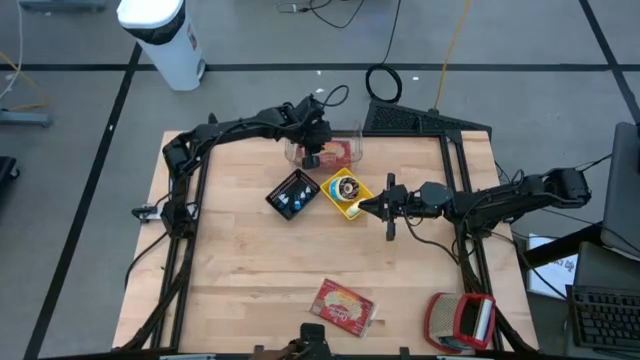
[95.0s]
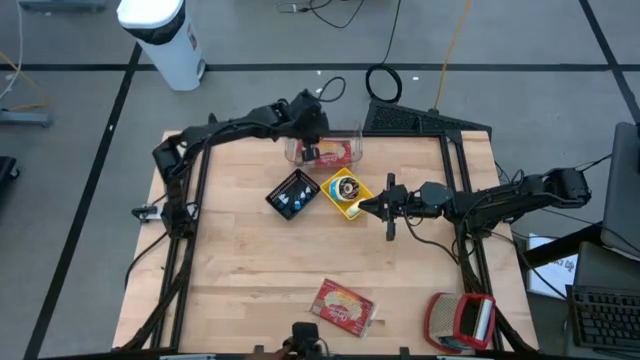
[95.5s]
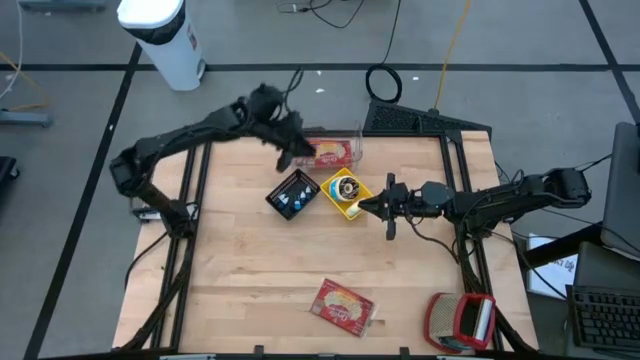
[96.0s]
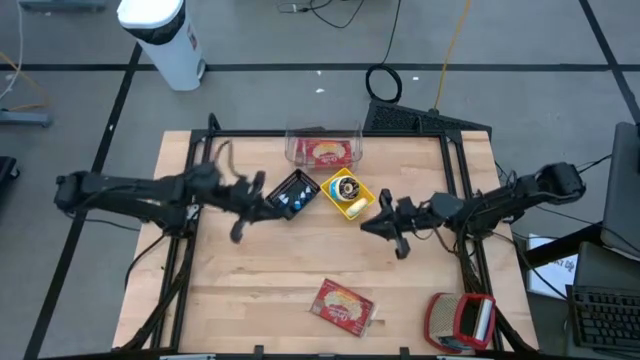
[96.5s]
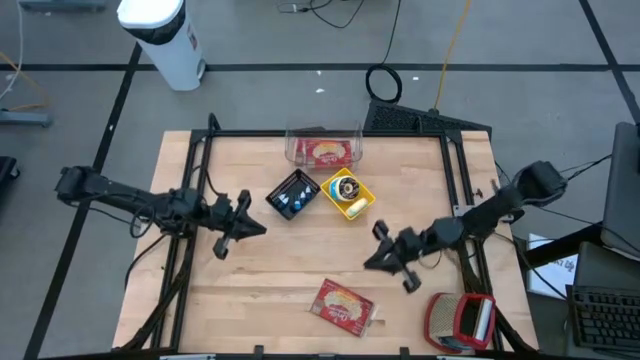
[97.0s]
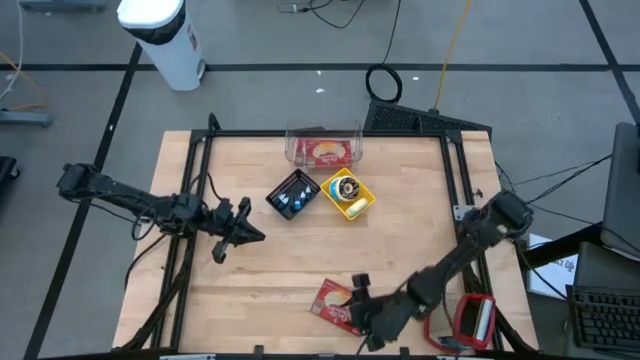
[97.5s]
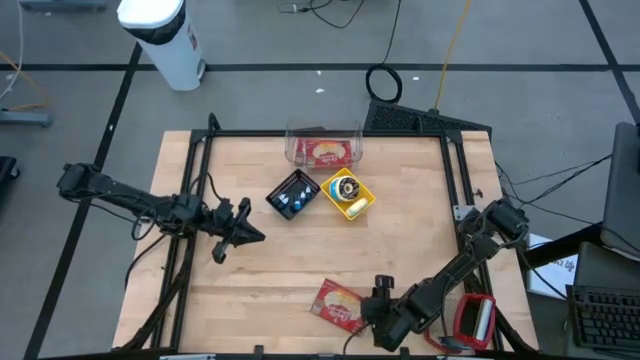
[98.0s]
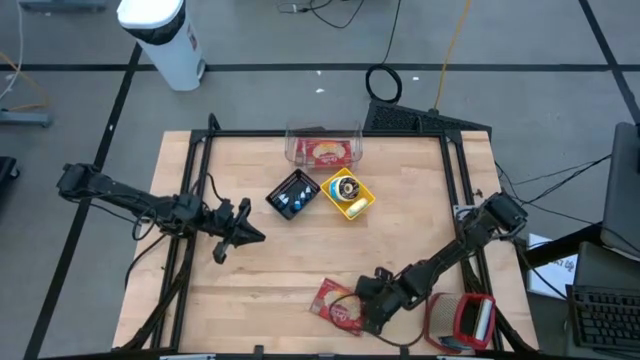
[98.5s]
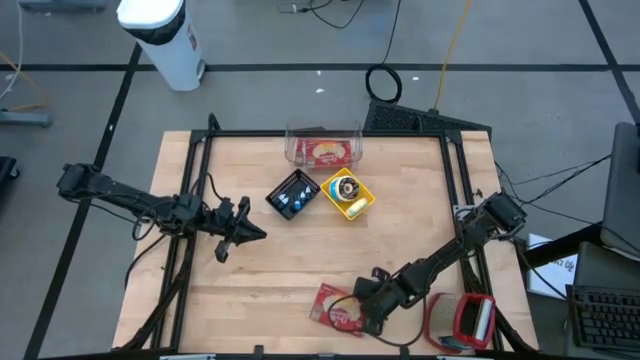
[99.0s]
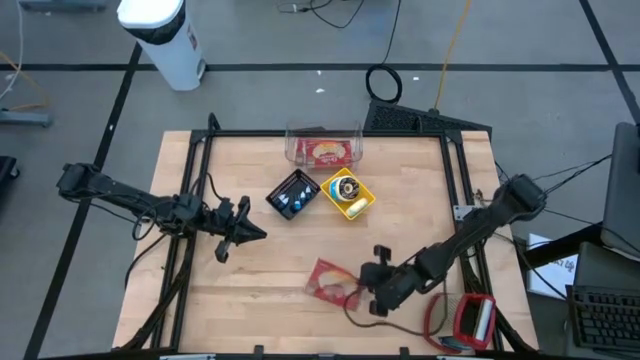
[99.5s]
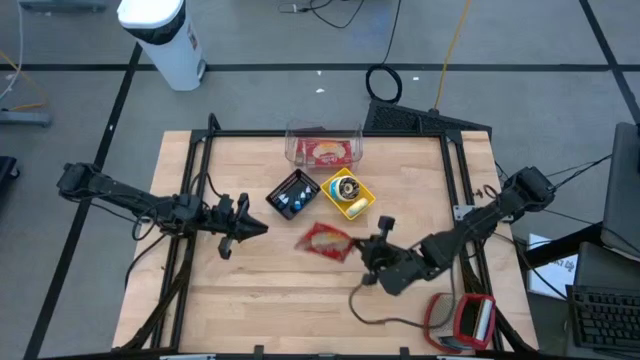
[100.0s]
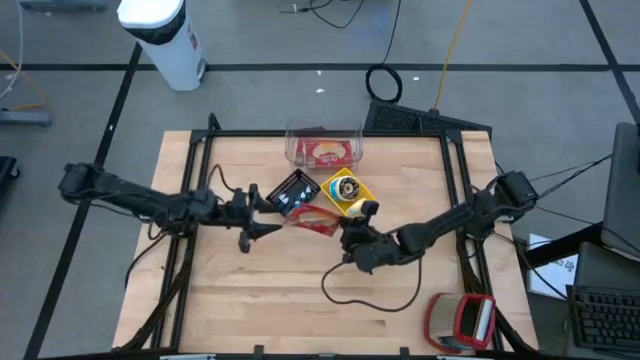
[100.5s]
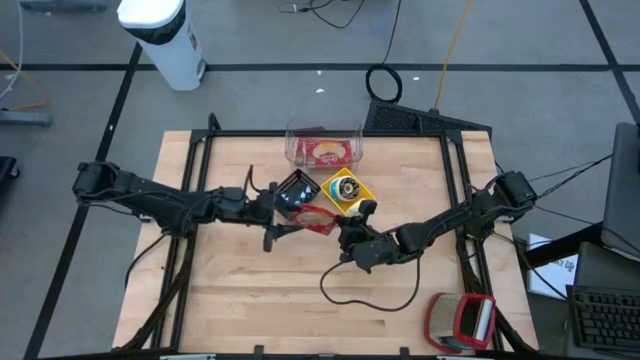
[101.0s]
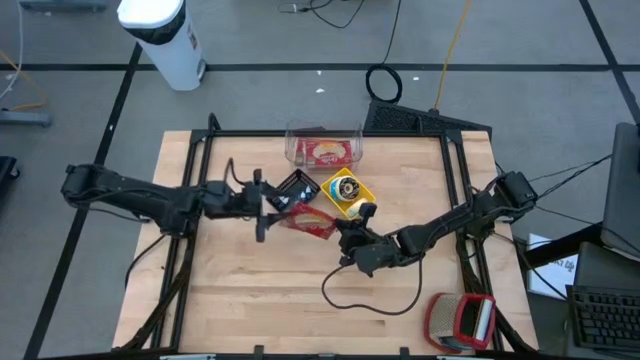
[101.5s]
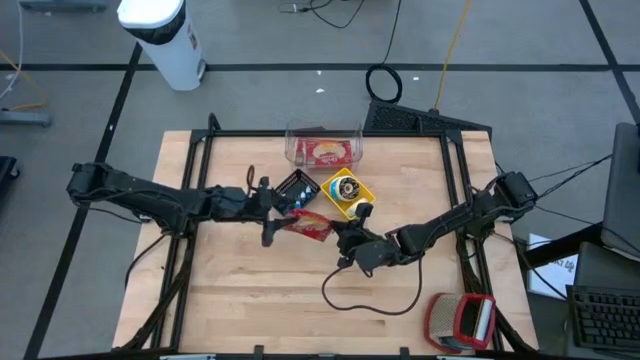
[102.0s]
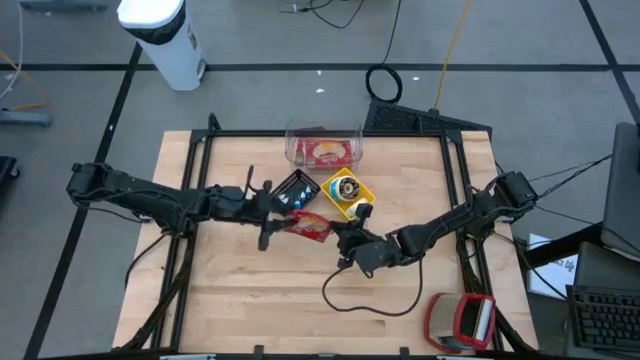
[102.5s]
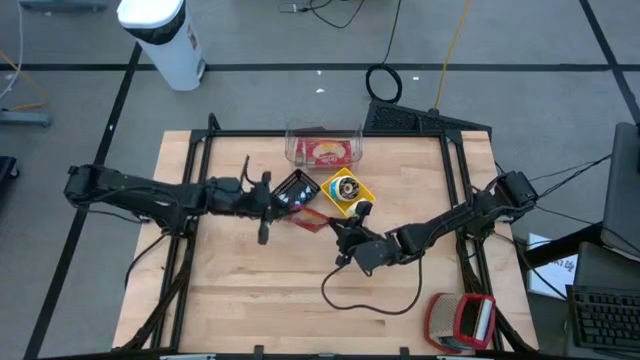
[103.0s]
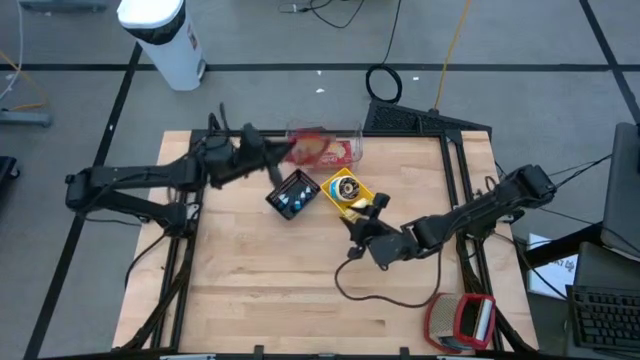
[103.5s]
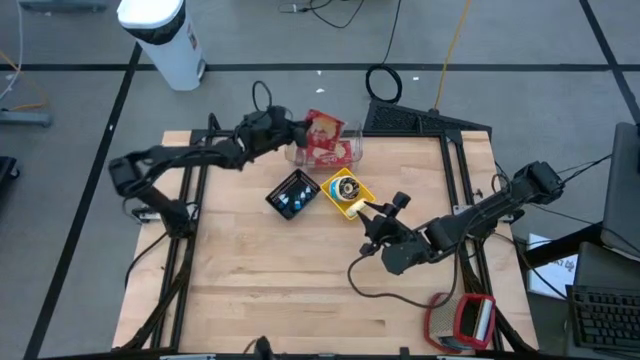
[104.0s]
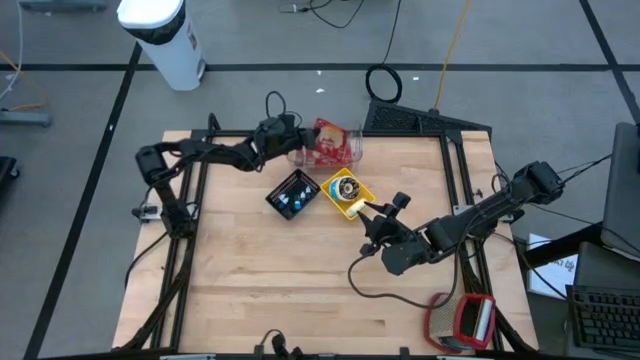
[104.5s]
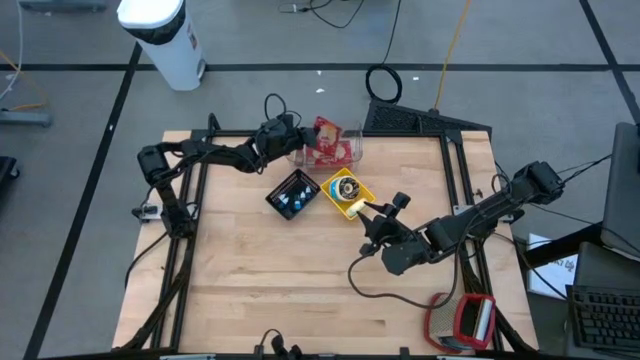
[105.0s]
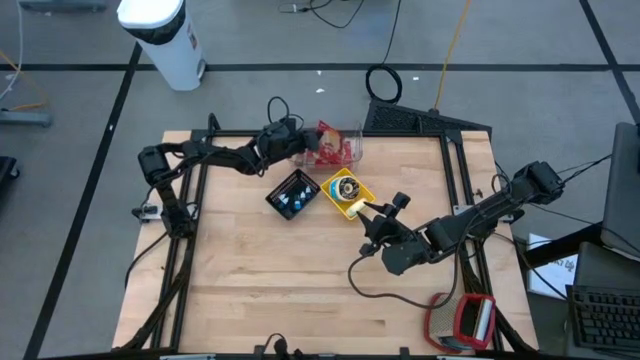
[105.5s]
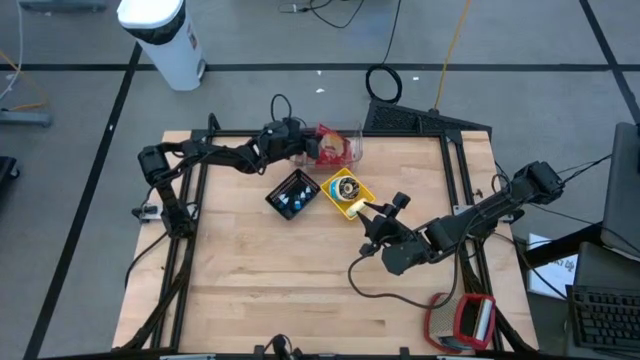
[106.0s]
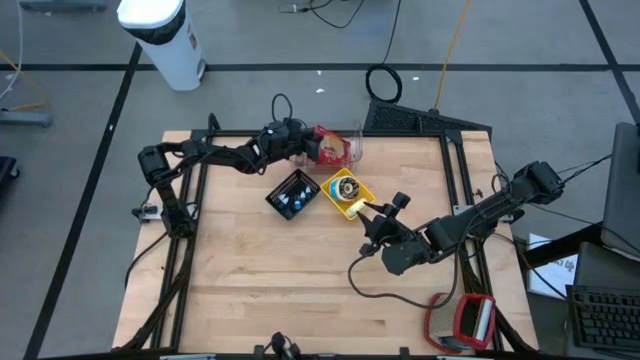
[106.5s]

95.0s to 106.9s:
Put the red bag into the transparent bin

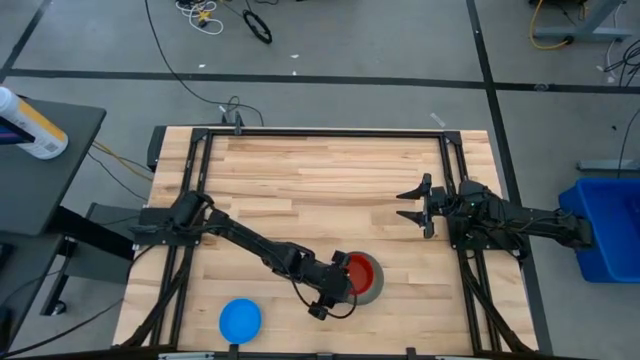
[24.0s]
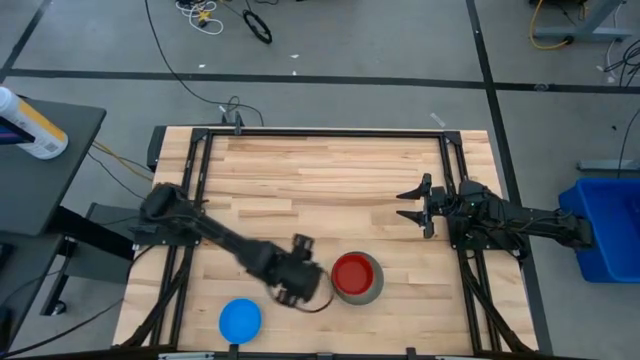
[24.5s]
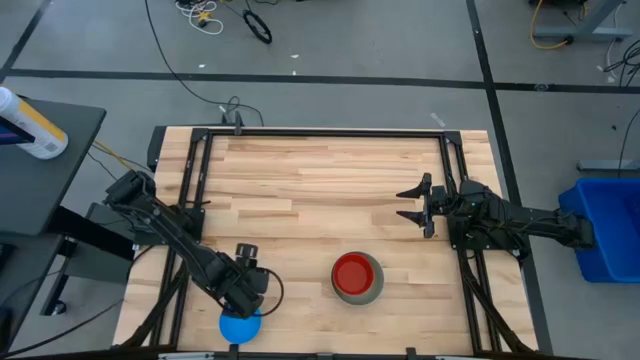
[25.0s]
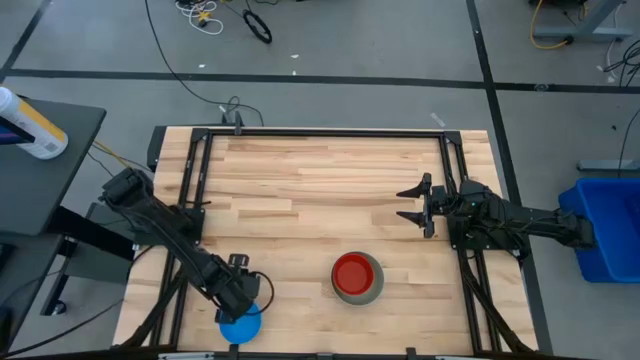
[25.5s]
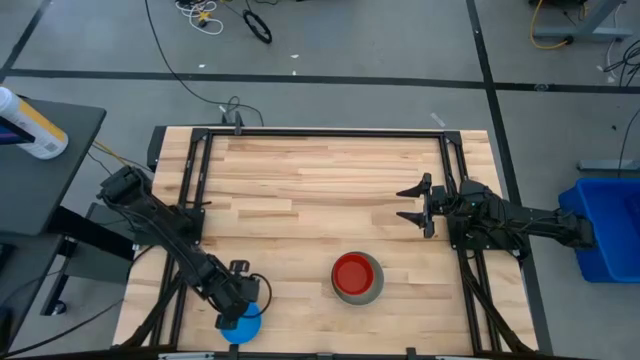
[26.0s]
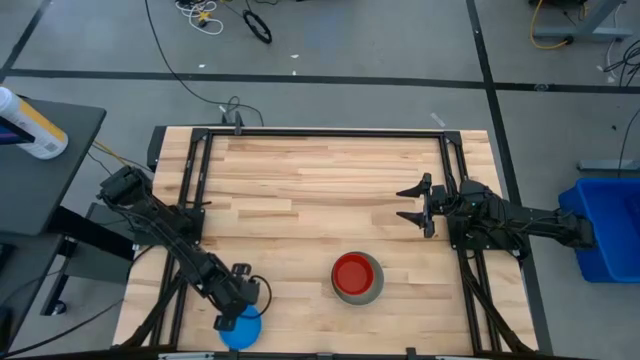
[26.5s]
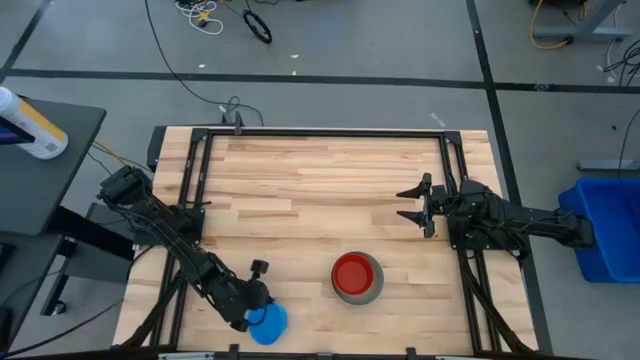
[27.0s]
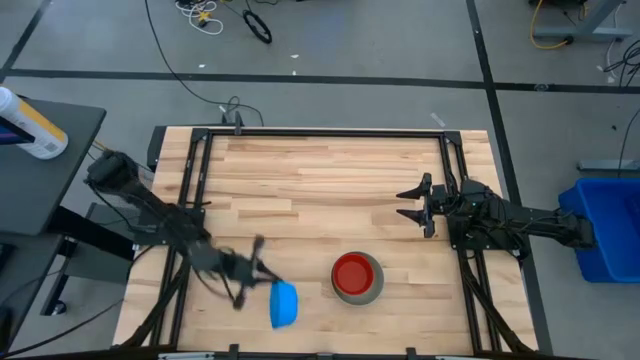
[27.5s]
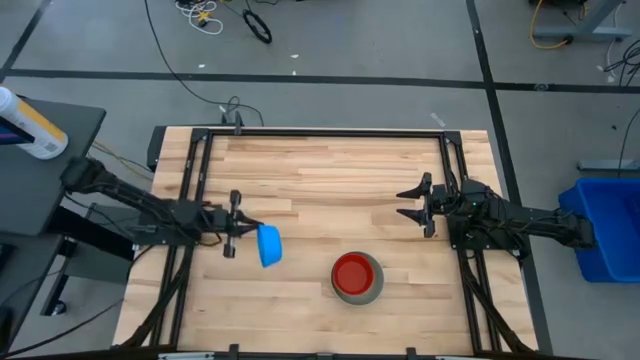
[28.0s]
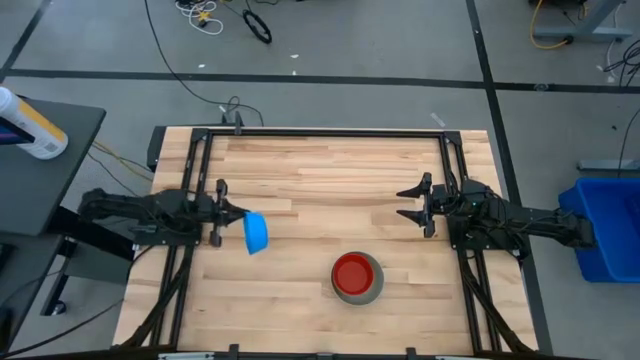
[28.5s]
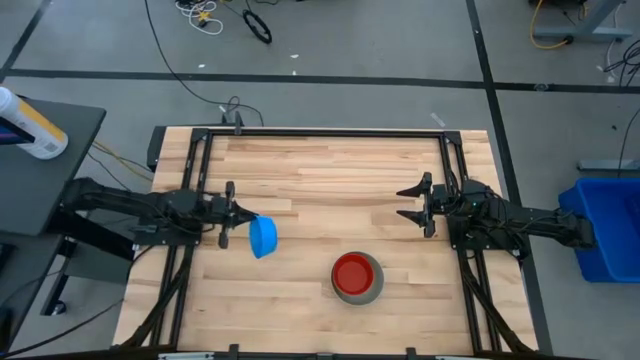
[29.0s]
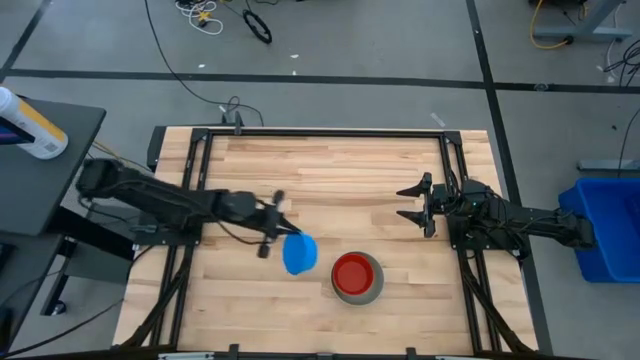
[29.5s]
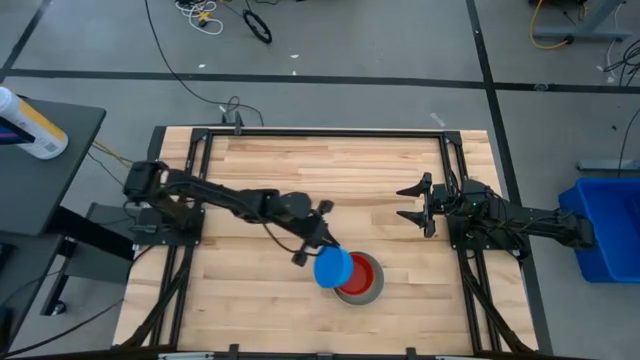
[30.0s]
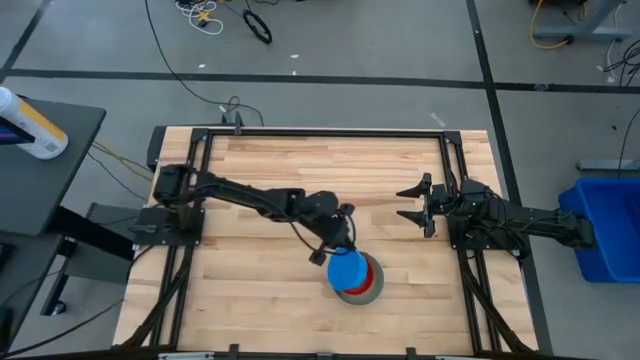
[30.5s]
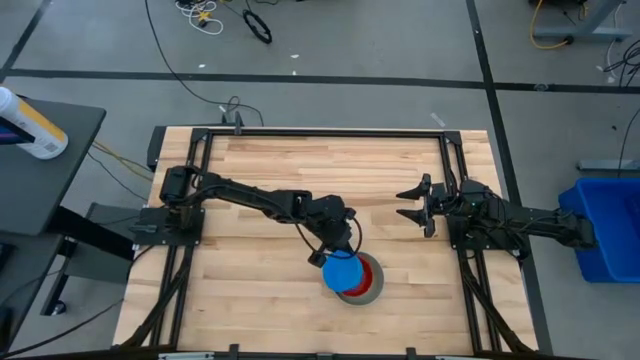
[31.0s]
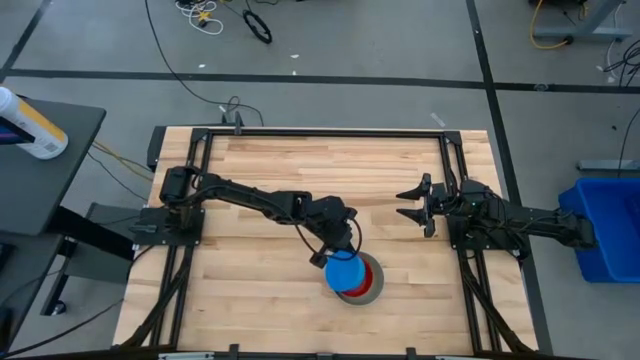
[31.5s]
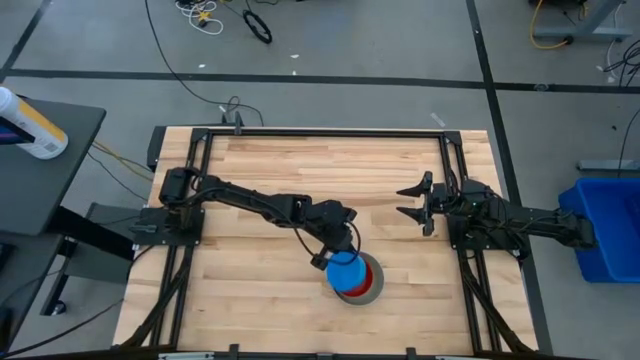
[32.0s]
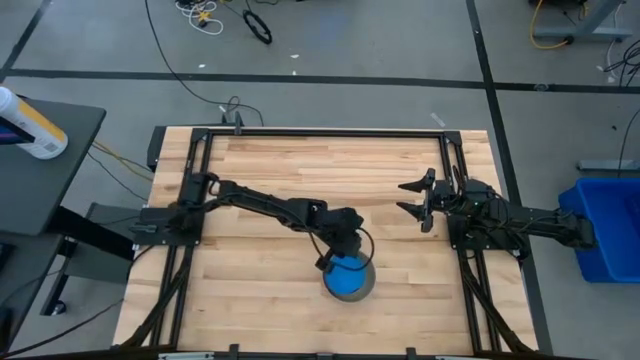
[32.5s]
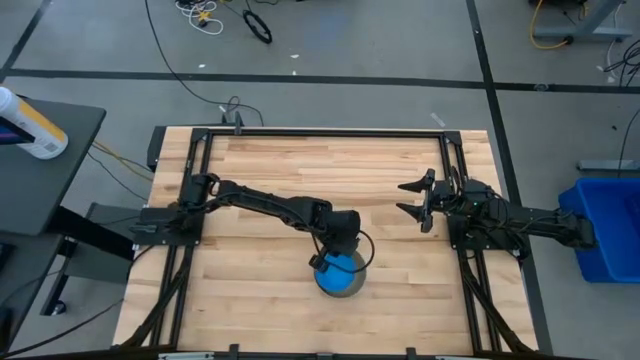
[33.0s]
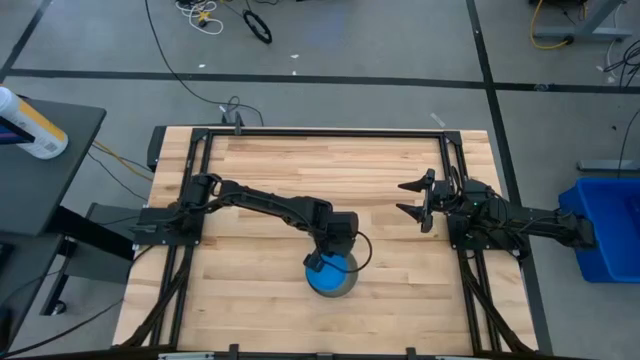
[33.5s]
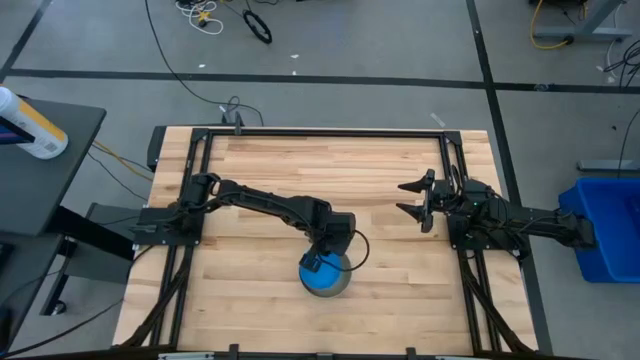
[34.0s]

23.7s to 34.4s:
Stack the light blue bowl on the red bowl
